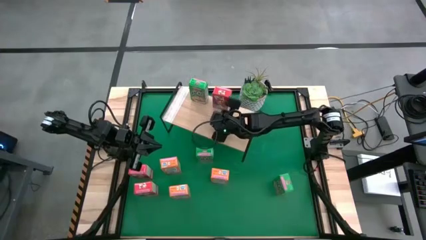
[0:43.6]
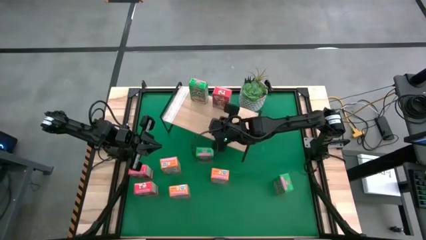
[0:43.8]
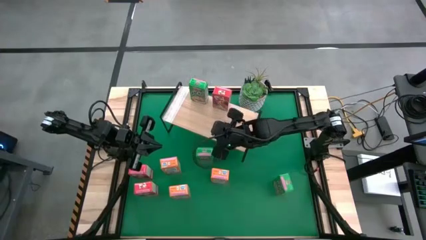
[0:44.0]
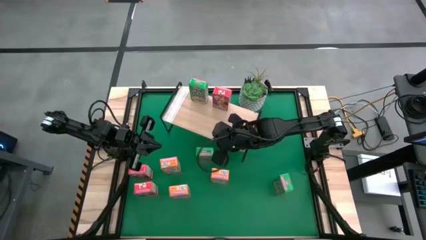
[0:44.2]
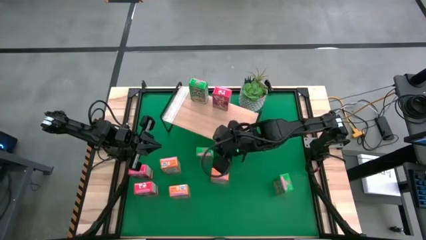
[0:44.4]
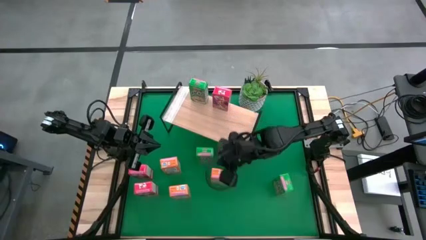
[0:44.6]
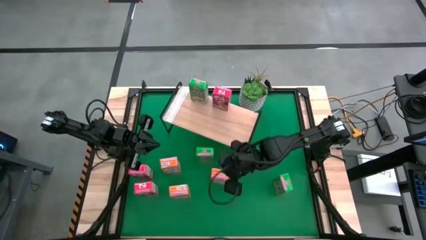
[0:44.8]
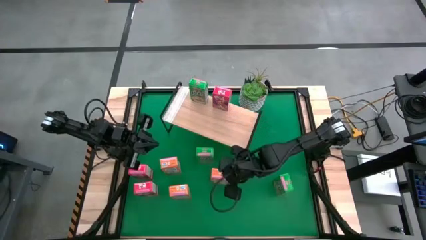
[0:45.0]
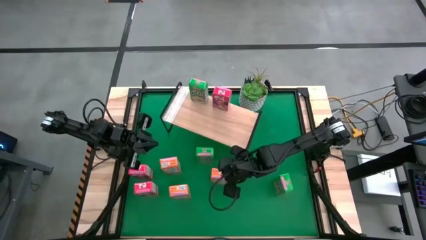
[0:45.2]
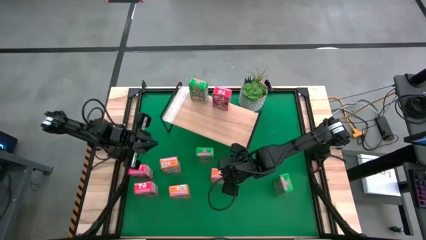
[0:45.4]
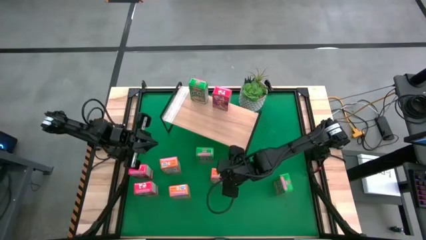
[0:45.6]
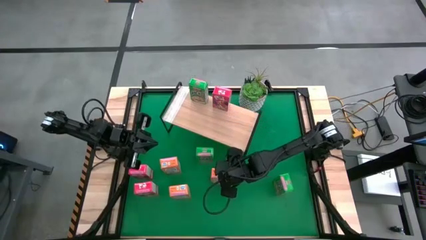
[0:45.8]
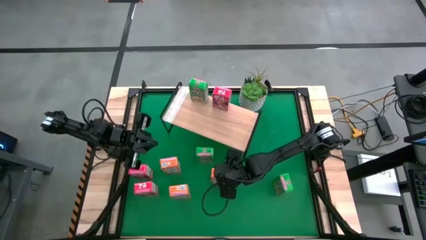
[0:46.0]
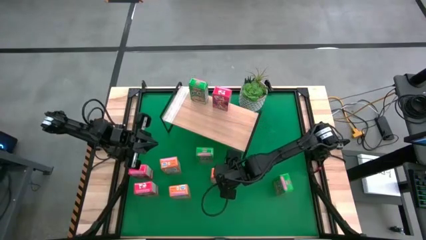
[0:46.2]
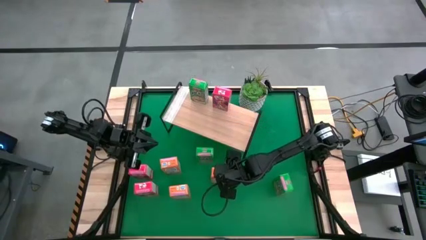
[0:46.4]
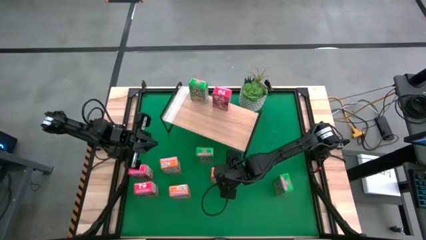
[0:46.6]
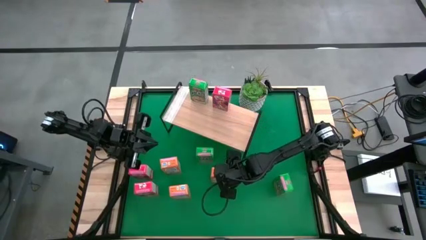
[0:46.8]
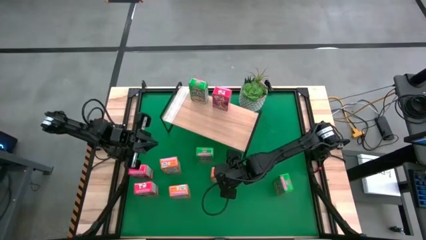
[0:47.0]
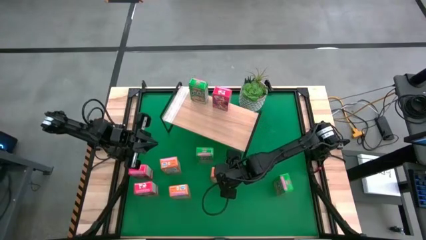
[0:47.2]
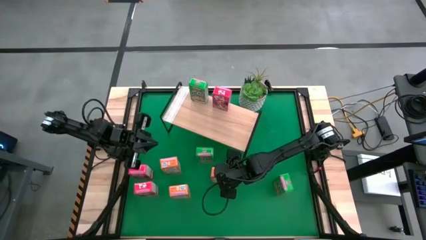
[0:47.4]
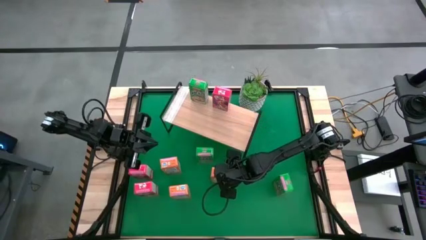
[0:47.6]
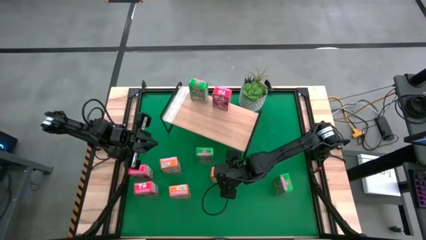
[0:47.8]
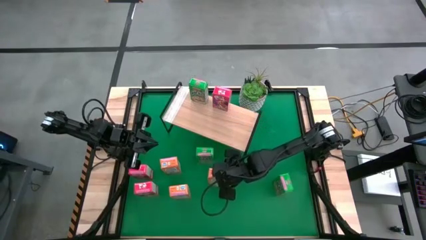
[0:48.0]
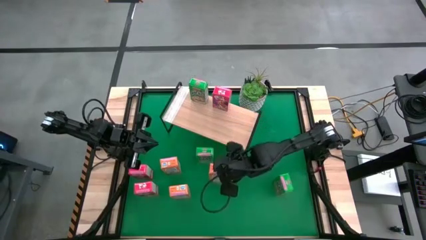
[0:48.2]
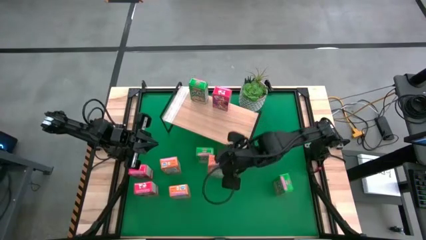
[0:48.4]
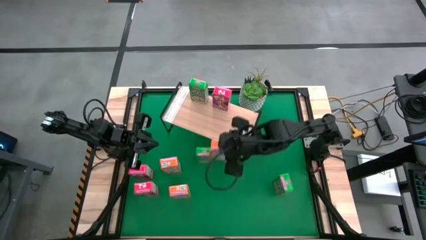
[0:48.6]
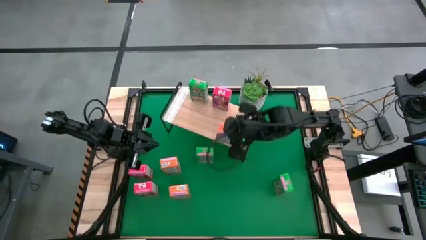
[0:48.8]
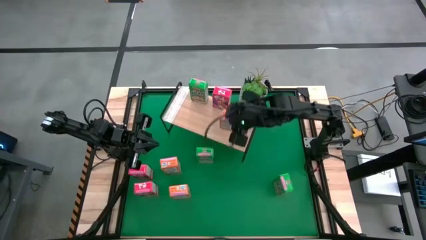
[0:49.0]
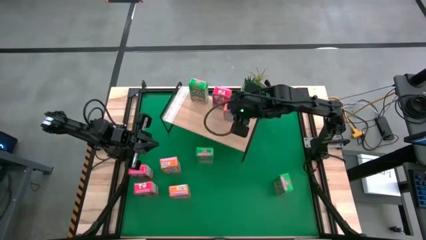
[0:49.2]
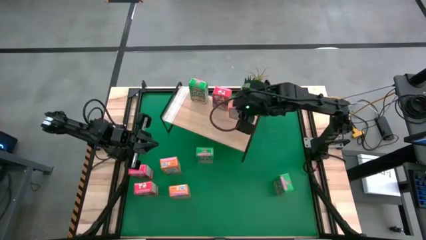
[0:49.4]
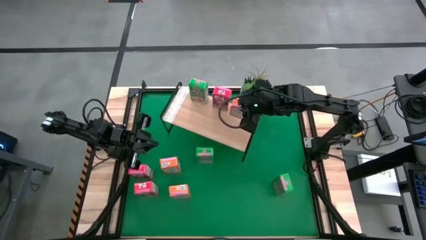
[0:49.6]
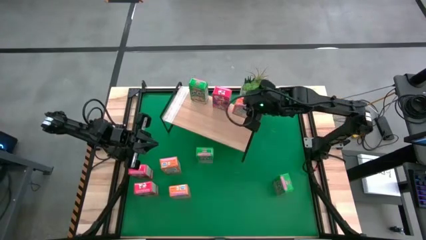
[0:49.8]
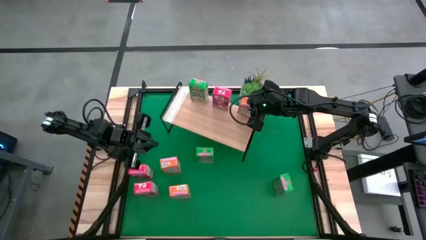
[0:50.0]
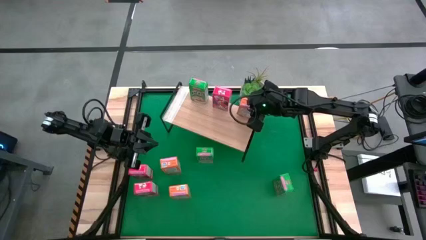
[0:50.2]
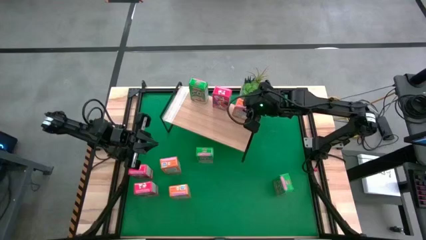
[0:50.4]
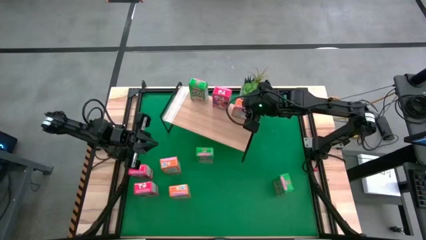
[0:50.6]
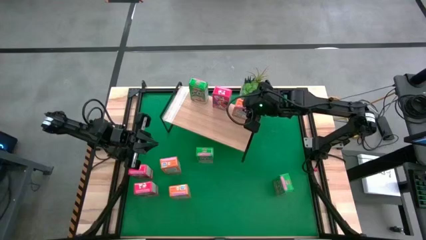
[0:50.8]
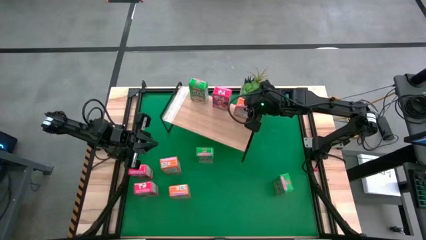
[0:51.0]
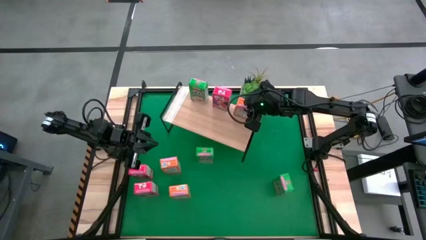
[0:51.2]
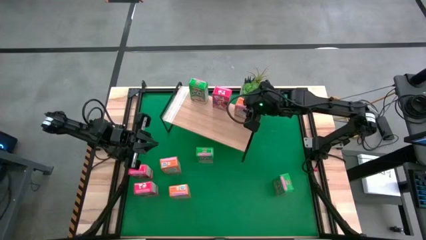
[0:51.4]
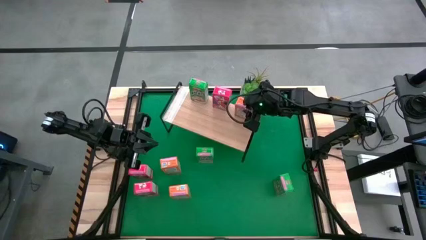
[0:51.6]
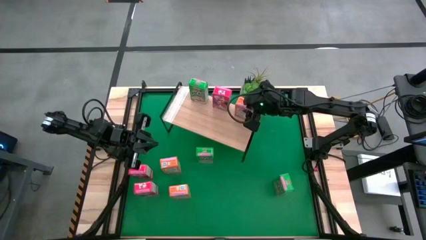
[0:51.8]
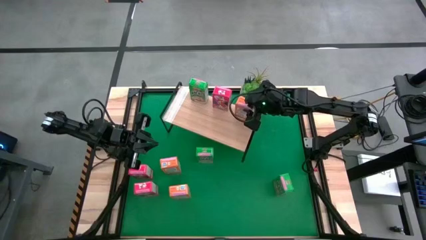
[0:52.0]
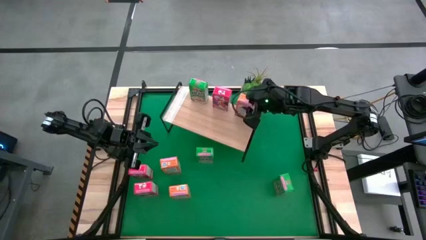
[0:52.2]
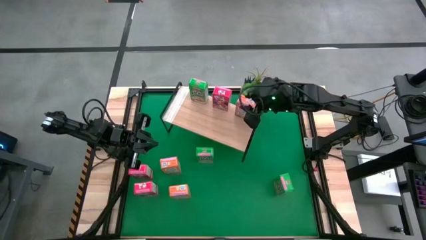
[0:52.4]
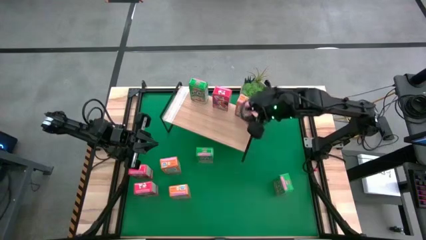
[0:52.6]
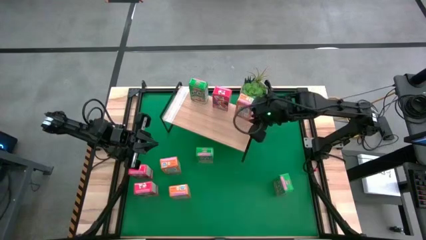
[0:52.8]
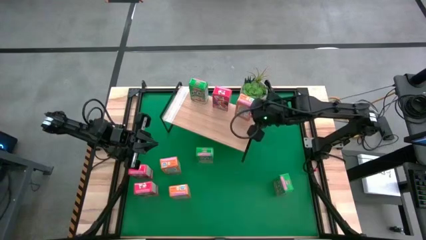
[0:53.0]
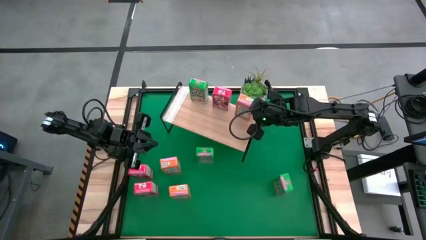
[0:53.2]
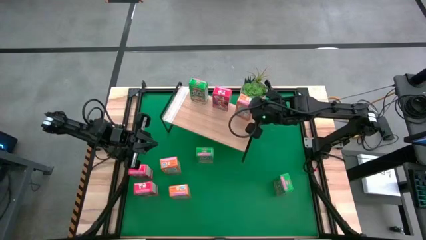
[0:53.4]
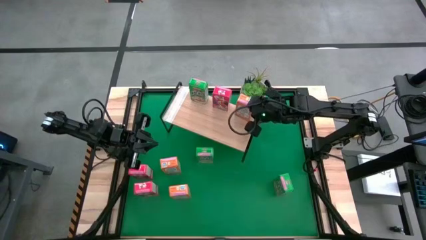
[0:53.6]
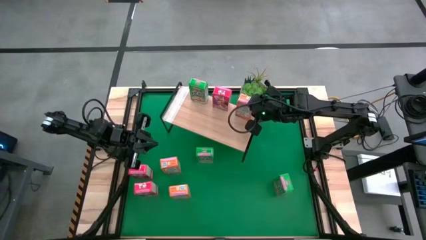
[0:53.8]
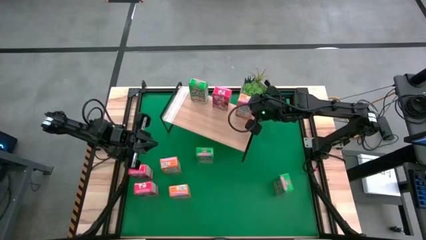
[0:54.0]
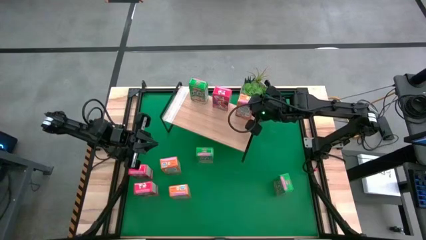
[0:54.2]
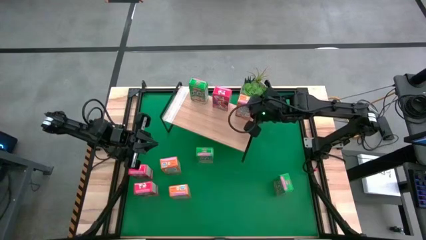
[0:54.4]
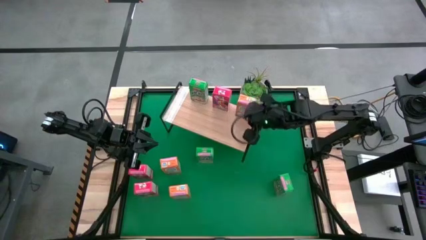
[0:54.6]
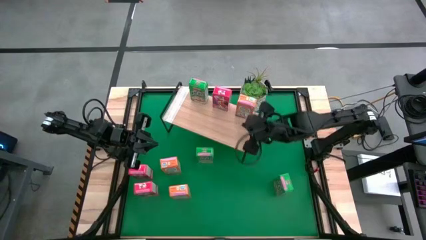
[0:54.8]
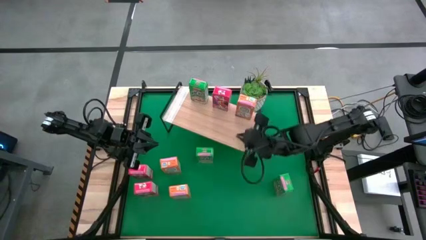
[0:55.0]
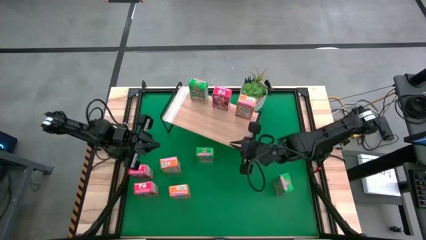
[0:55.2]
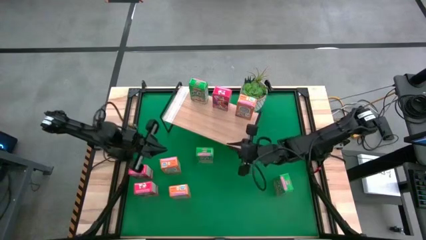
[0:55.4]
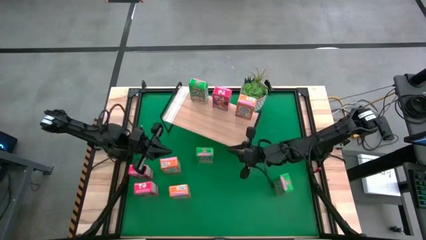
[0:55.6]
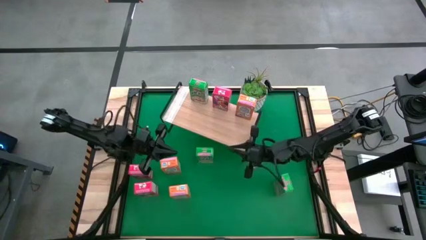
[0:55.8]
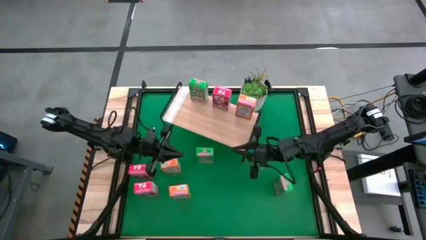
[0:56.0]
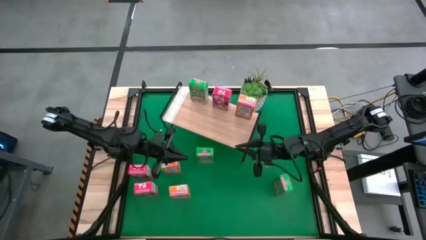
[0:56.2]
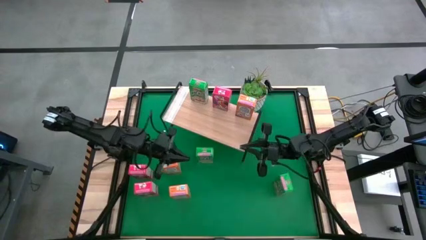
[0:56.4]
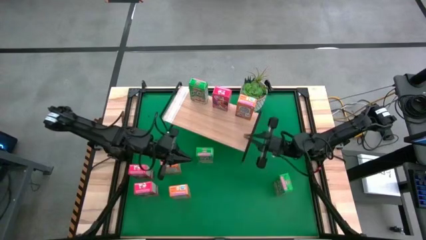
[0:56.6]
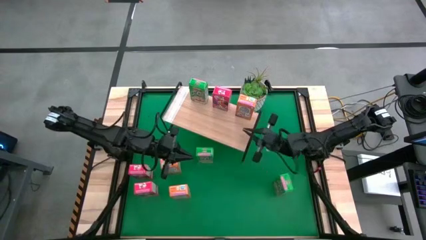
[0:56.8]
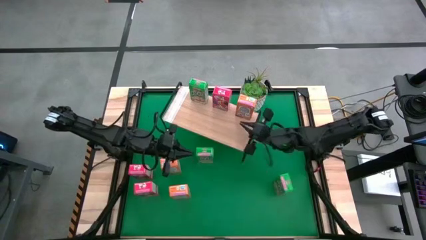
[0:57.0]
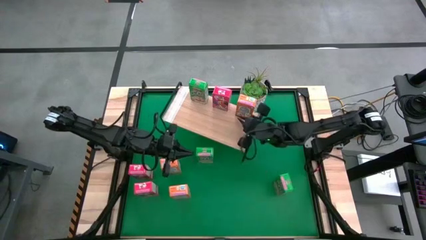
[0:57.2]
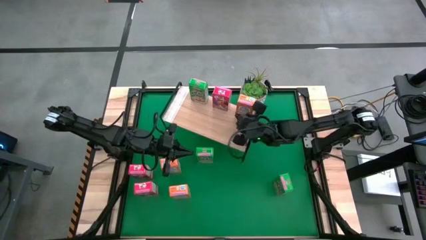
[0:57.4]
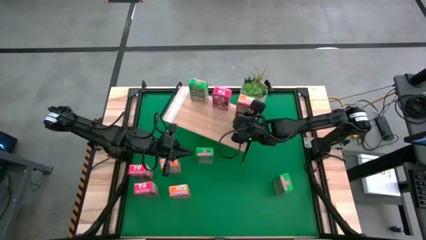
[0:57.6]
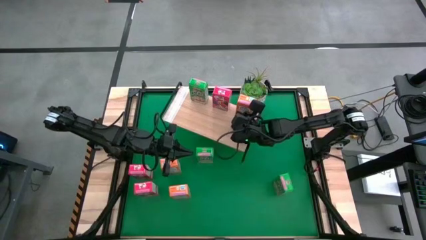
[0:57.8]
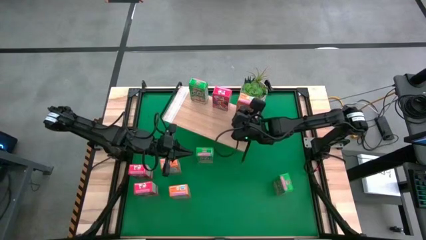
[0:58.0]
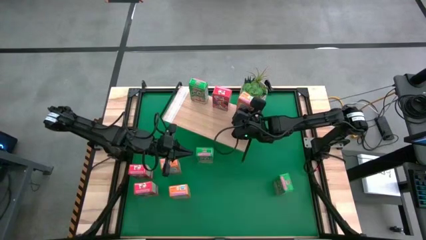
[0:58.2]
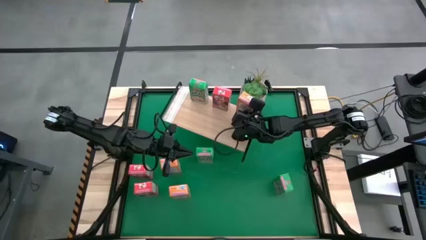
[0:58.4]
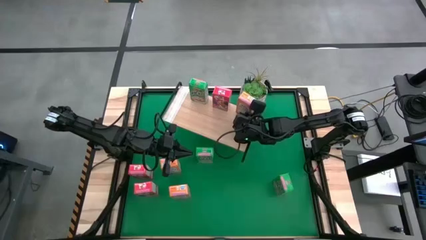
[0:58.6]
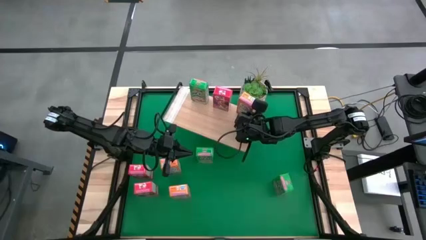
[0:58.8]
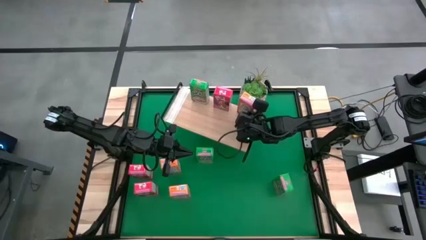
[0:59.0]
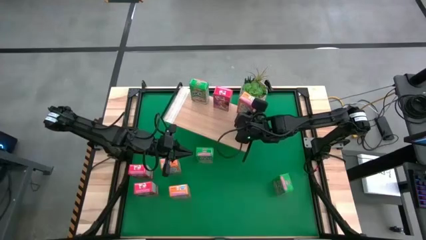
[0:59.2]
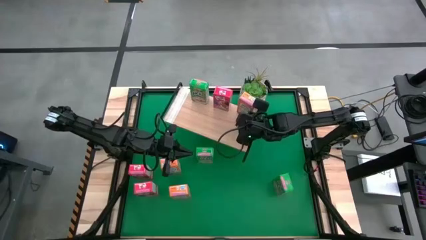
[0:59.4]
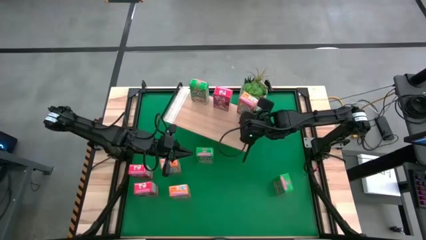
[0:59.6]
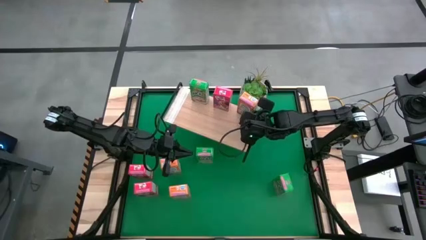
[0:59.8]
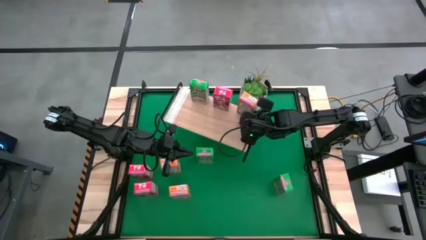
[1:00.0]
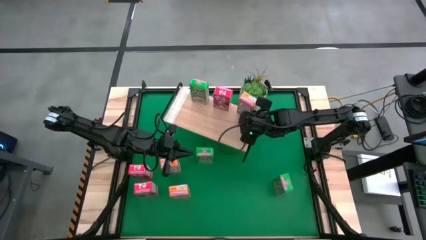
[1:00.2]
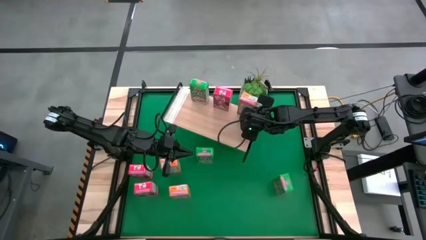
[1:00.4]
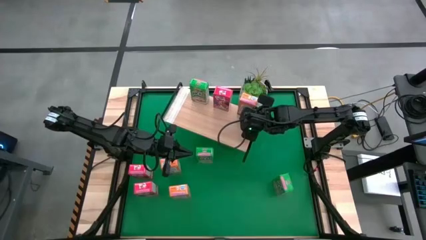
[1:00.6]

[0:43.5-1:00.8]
Task: Stack cereal on shelf
Put the middle right orange cereal box on the shelf
